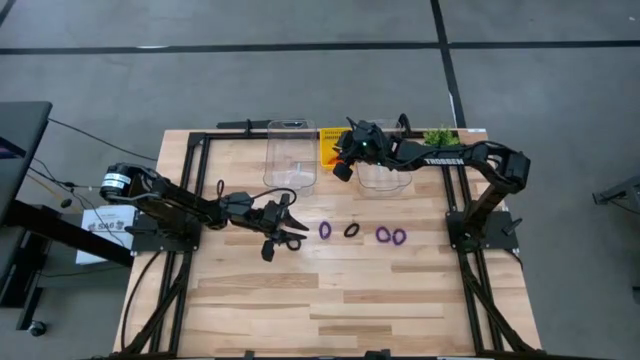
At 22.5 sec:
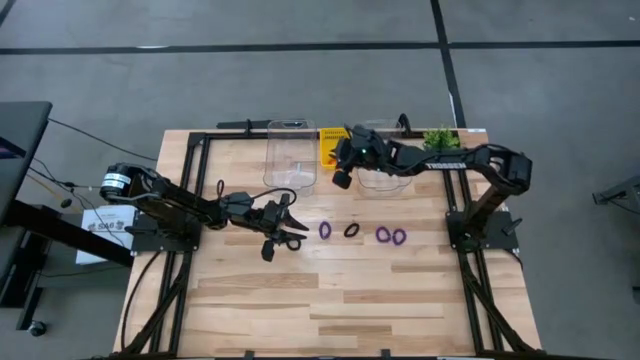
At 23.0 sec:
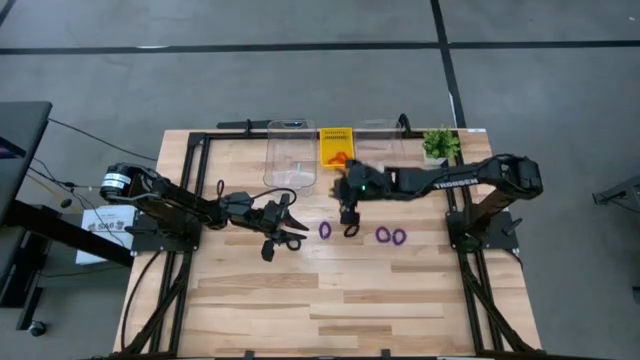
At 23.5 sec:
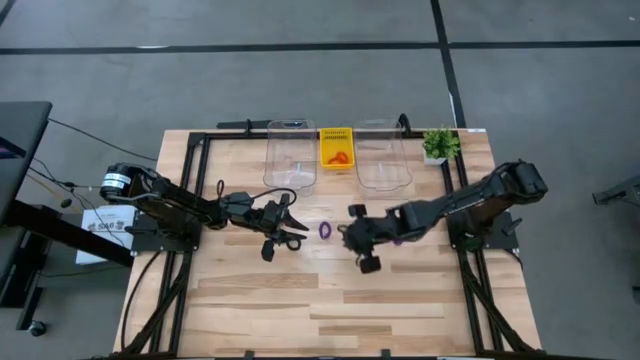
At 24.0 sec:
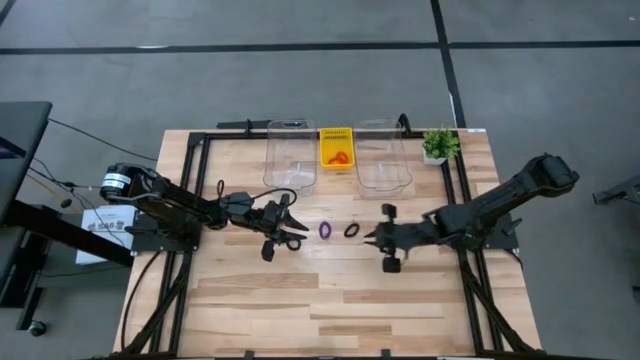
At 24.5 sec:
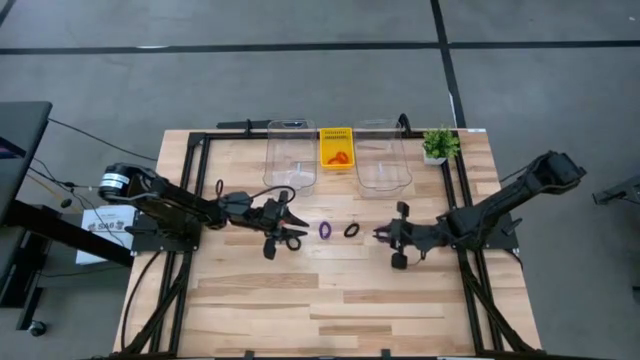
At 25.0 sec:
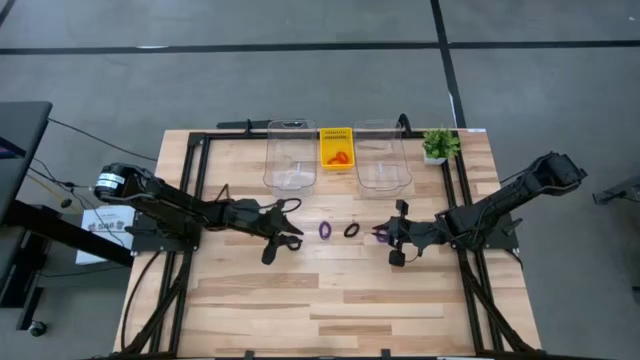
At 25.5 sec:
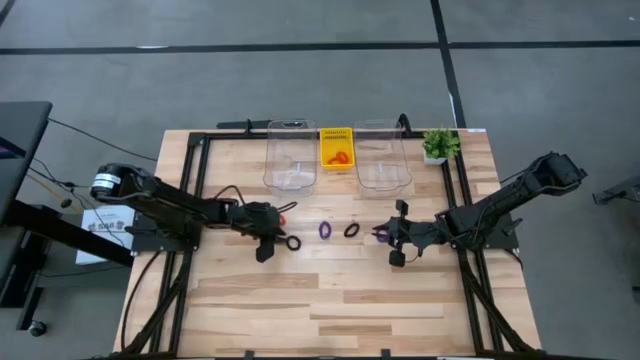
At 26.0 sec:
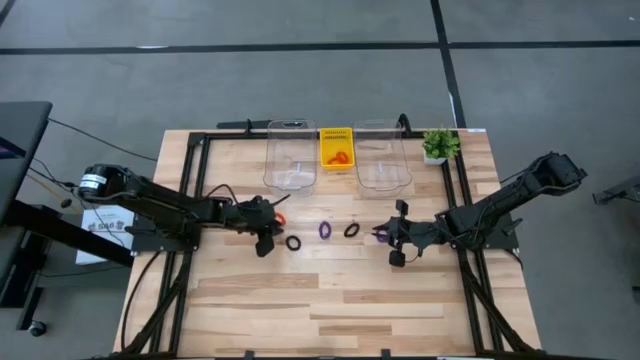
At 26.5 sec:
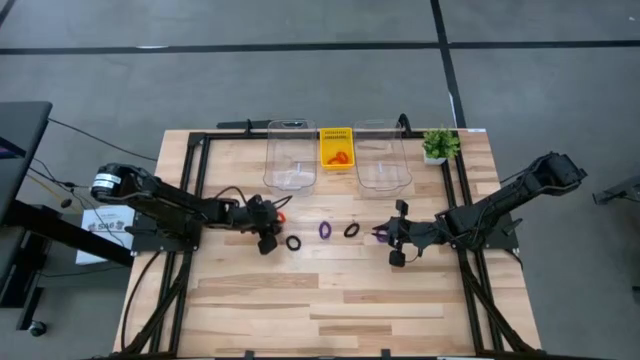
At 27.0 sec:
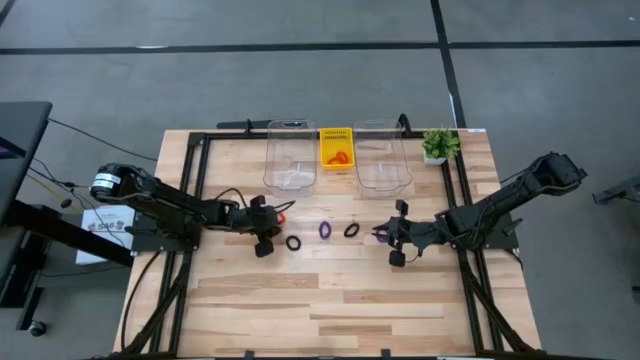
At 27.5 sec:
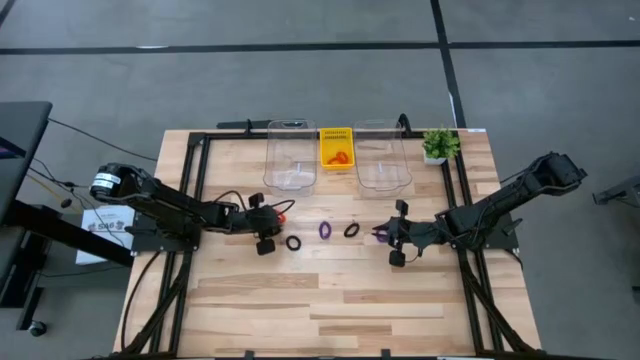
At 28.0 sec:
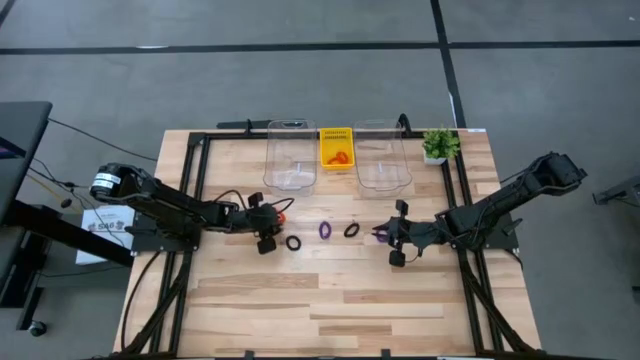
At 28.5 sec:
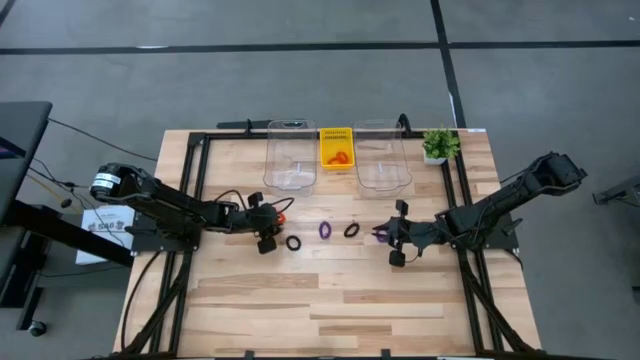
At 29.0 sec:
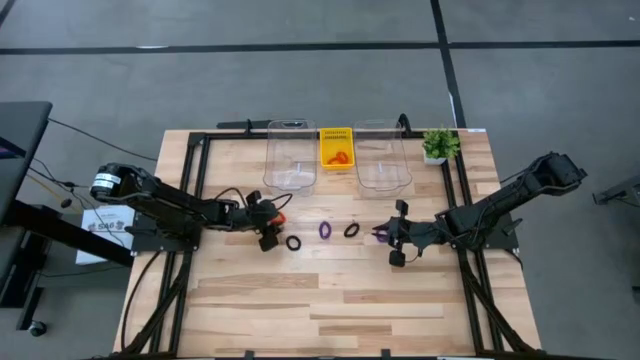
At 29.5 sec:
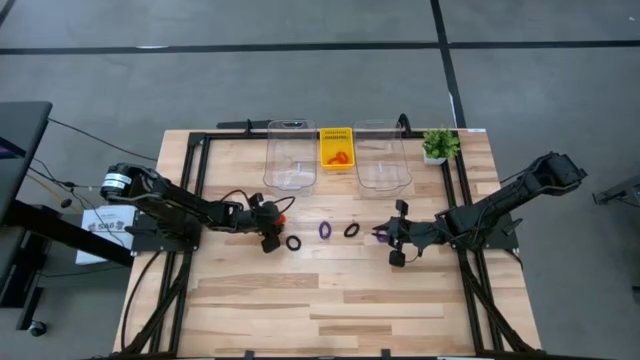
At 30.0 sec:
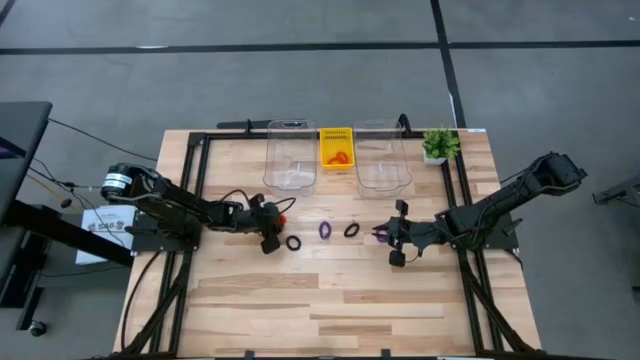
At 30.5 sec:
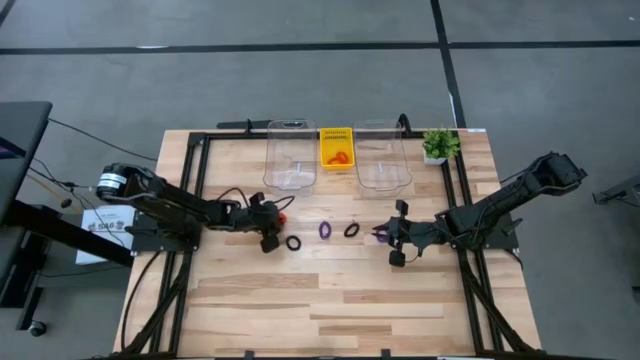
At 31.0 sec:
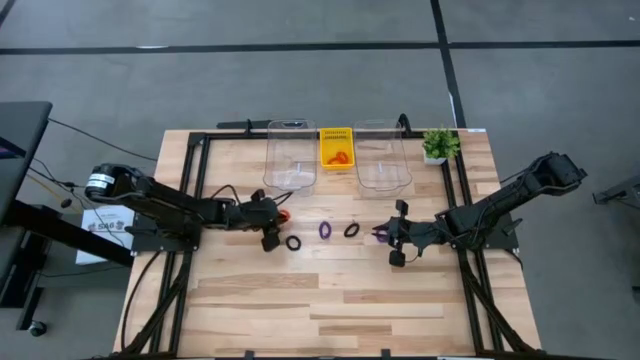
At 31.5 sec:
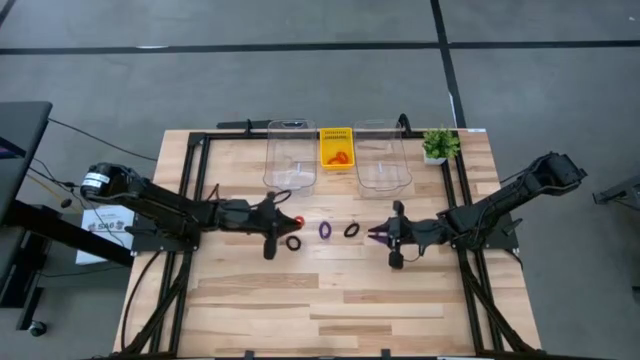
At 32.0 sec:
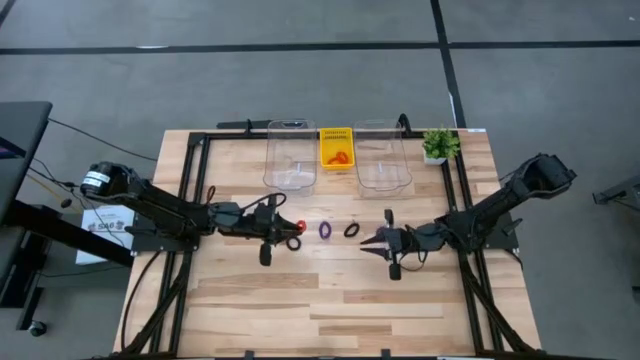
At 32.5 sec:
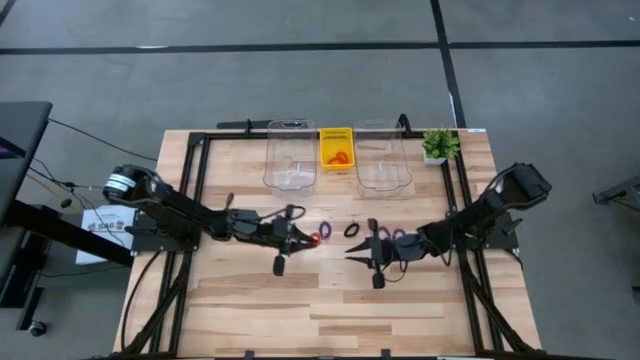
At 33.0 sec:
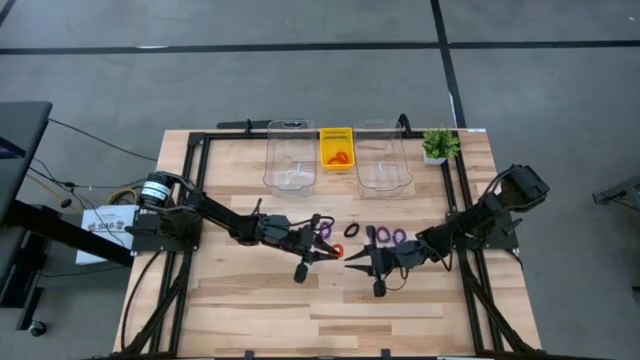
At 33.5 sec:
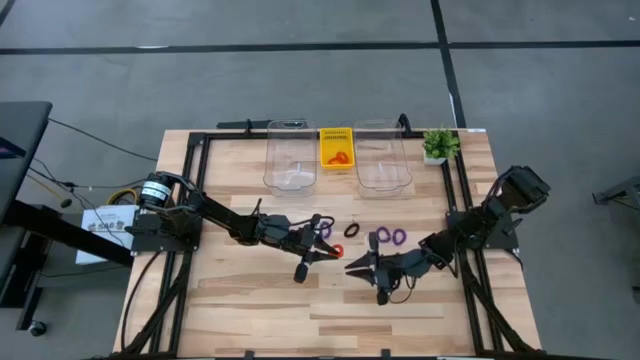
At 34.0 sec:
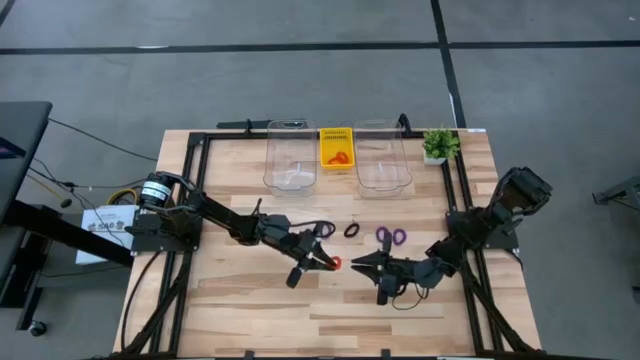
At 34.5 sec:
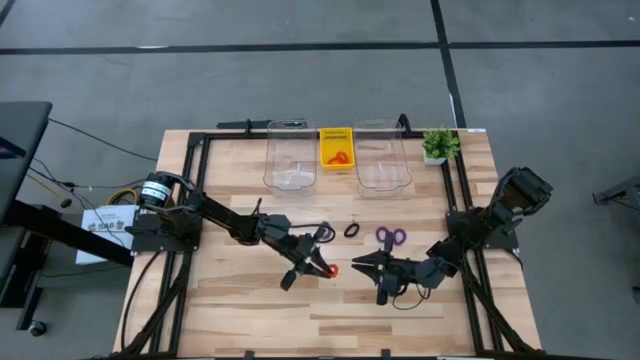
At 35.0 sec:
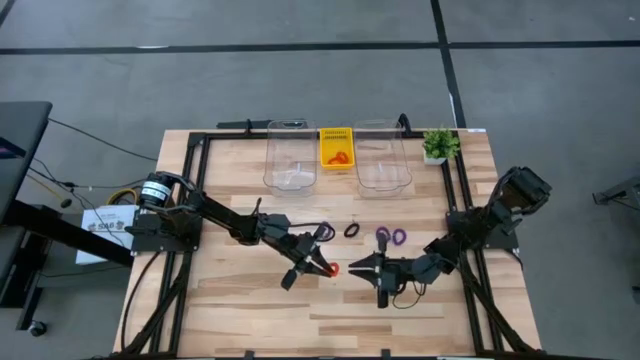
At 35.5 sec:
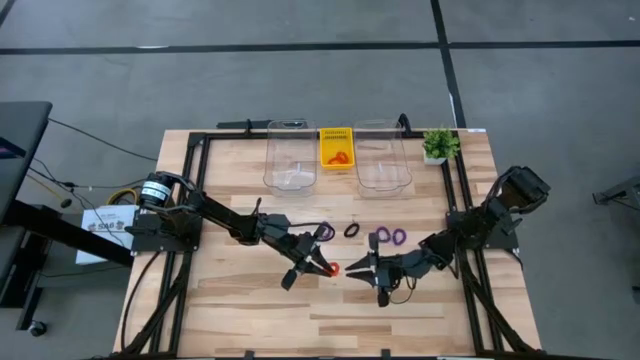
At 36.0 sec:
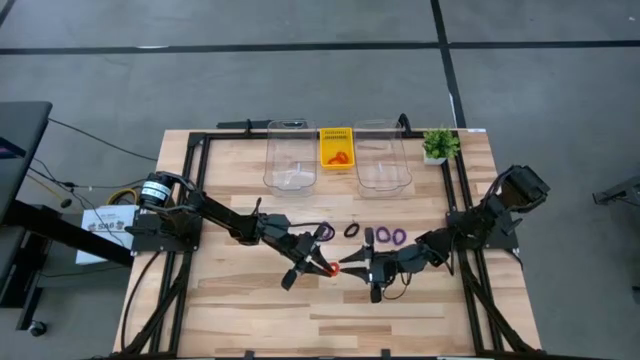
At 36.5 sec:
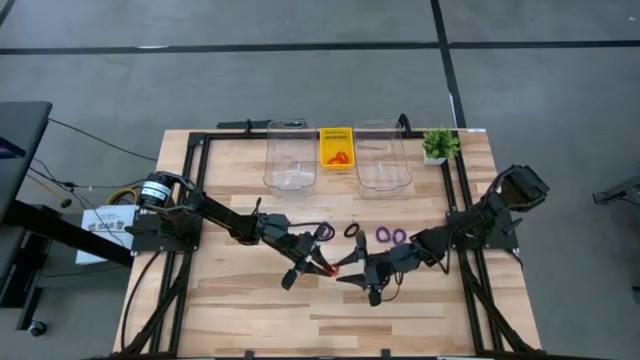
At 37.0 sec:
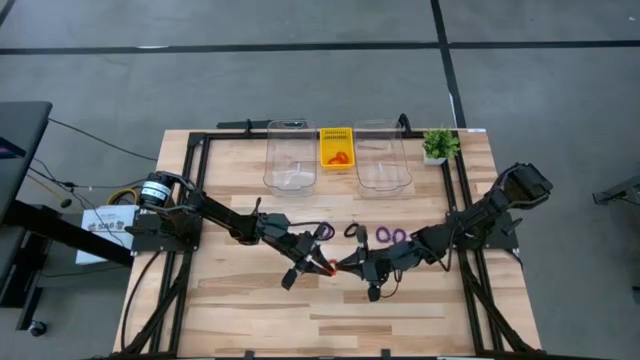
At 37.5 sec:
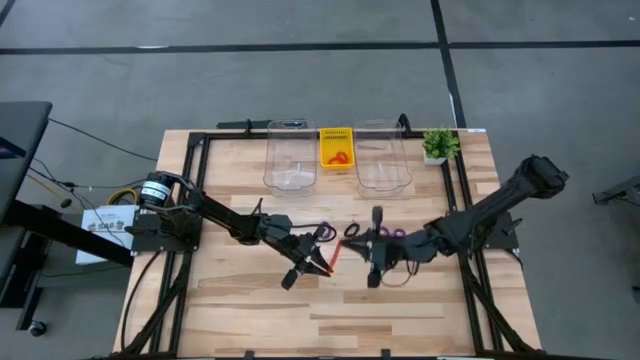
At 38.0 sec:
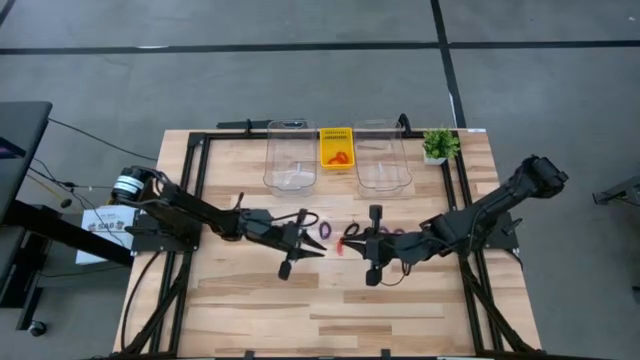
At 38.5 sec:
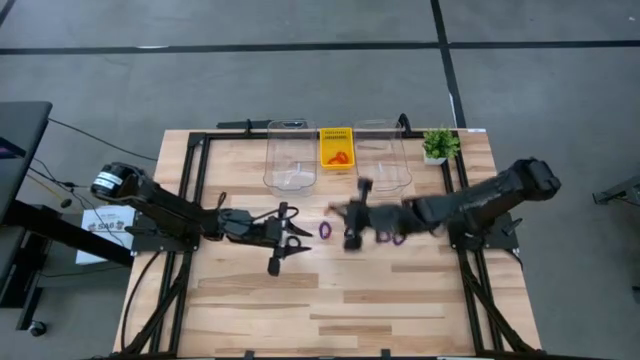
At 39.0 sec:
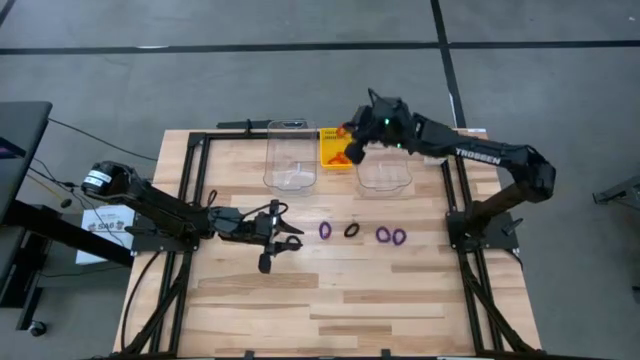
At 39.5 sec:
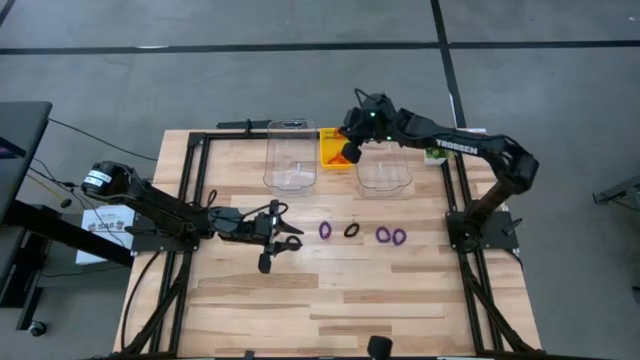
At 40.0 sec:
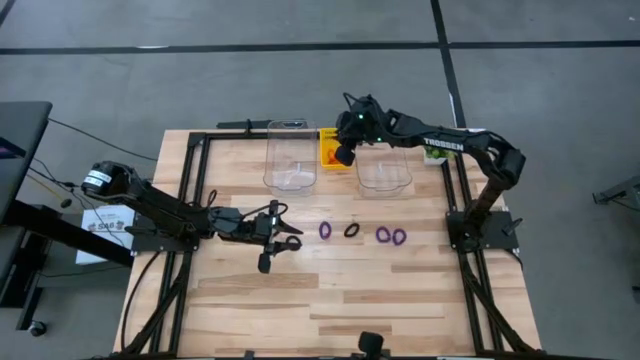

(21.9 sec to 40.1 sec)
Task: Sort spring keychains
Put the orange spring keychain into the yellow bin
